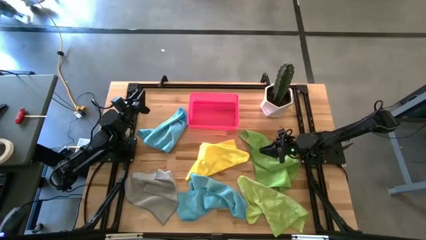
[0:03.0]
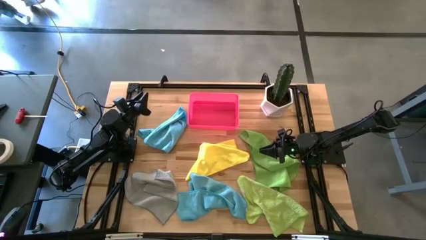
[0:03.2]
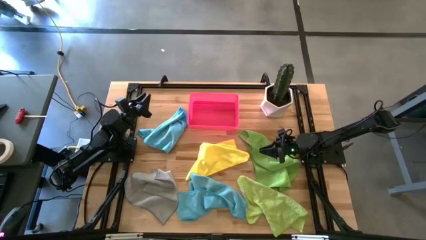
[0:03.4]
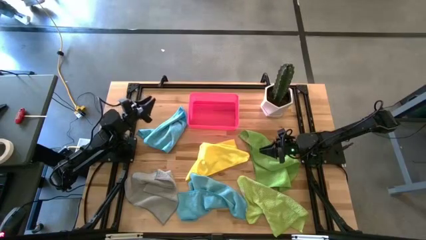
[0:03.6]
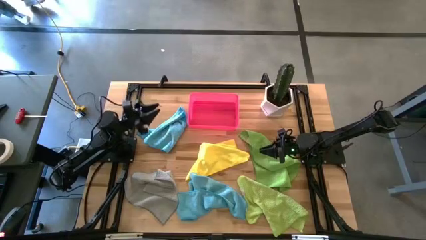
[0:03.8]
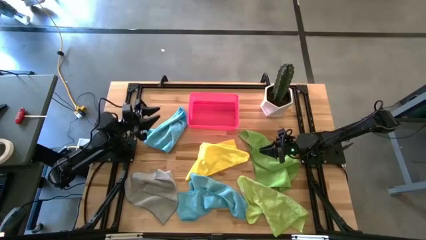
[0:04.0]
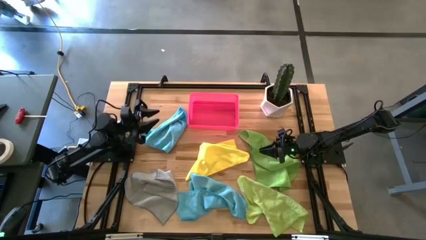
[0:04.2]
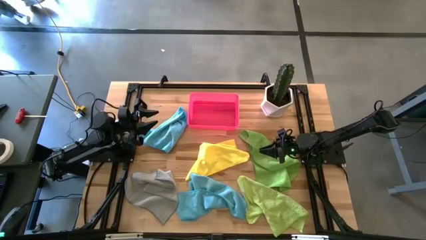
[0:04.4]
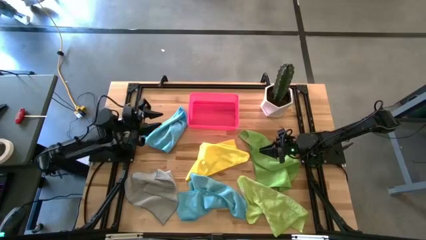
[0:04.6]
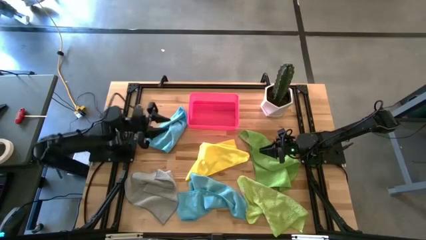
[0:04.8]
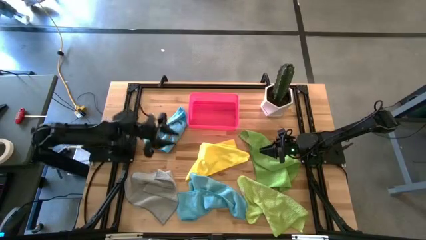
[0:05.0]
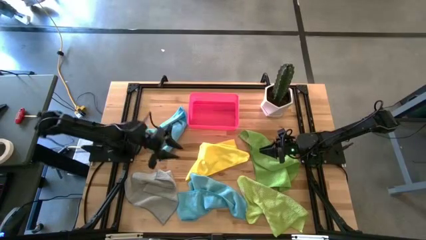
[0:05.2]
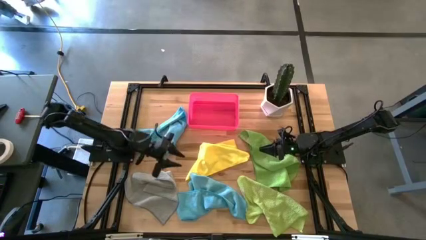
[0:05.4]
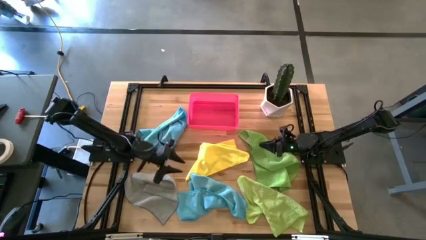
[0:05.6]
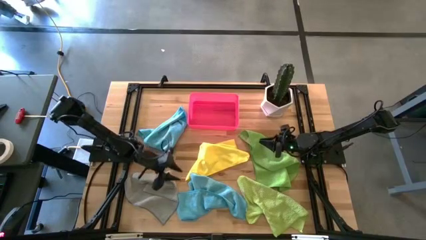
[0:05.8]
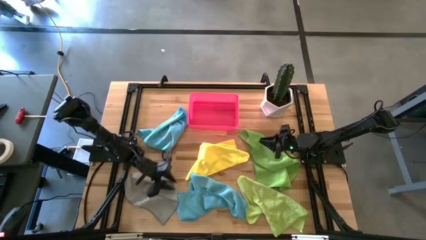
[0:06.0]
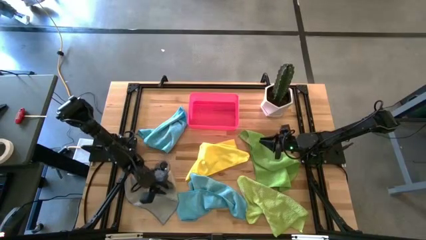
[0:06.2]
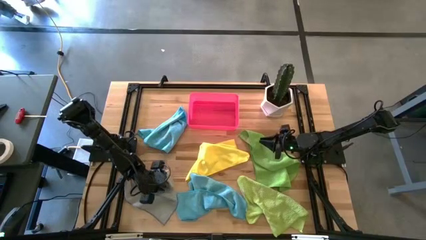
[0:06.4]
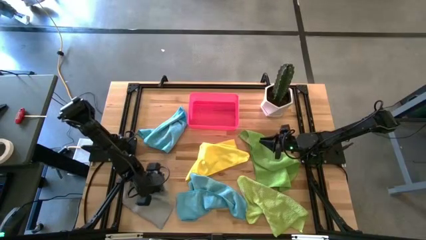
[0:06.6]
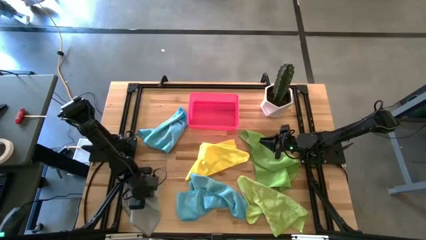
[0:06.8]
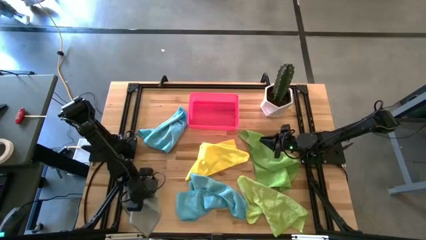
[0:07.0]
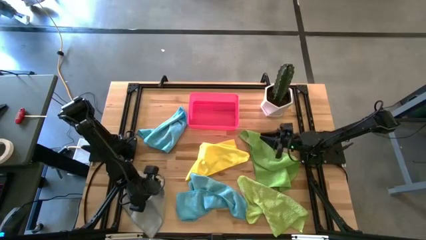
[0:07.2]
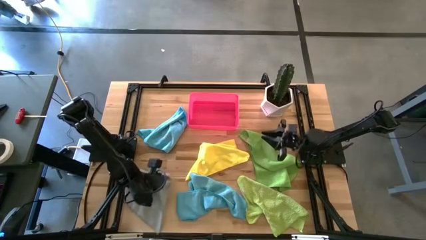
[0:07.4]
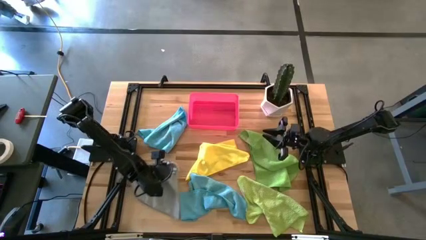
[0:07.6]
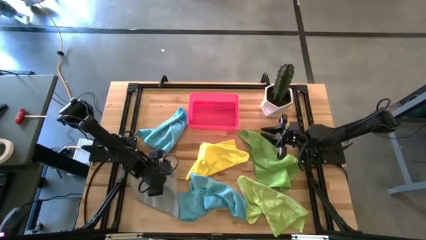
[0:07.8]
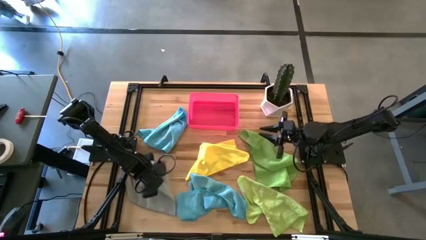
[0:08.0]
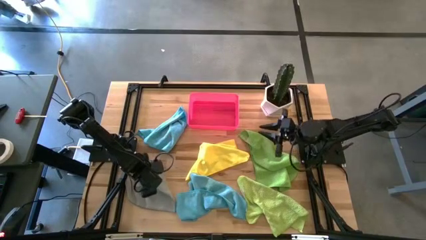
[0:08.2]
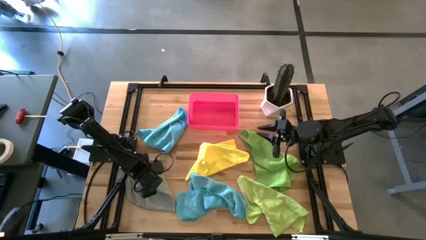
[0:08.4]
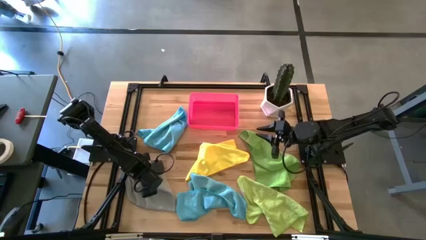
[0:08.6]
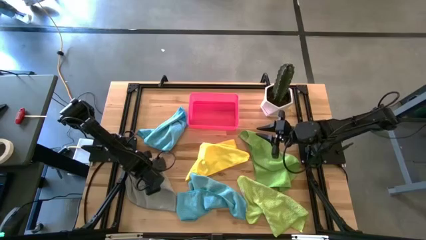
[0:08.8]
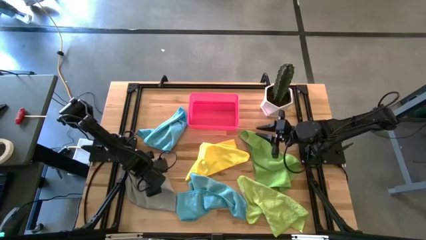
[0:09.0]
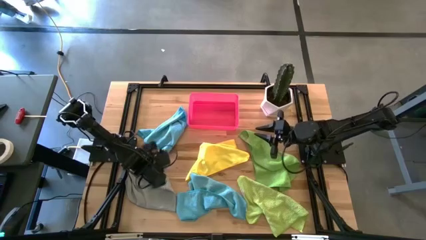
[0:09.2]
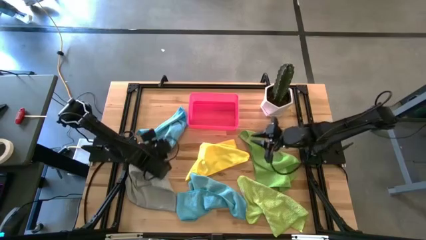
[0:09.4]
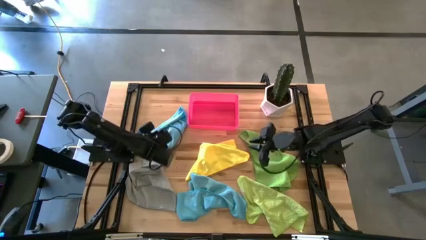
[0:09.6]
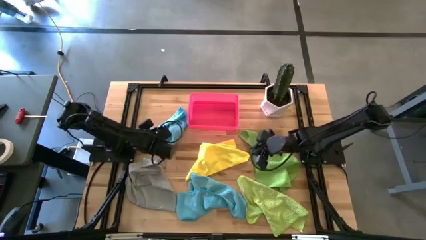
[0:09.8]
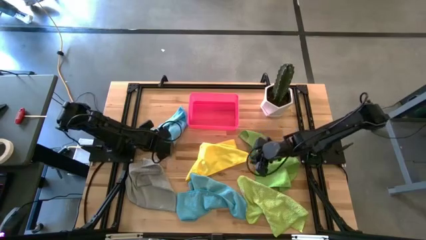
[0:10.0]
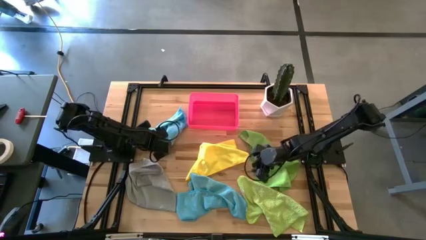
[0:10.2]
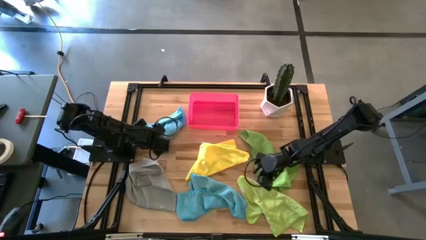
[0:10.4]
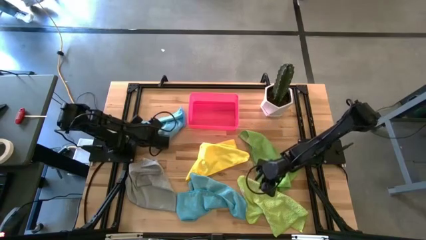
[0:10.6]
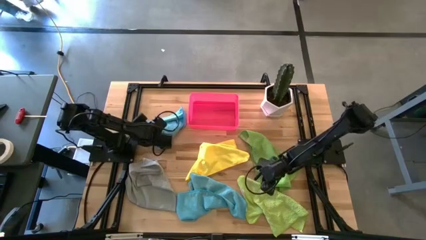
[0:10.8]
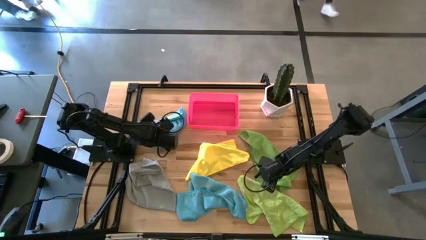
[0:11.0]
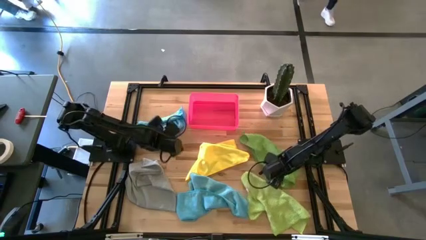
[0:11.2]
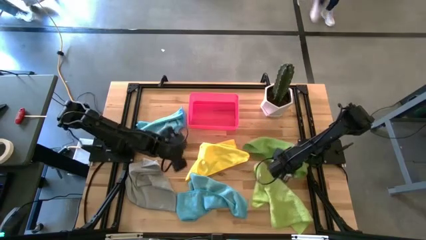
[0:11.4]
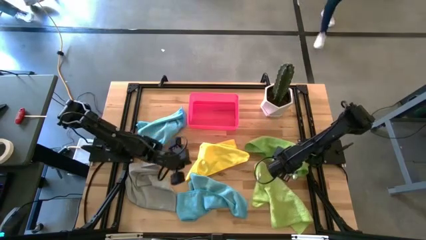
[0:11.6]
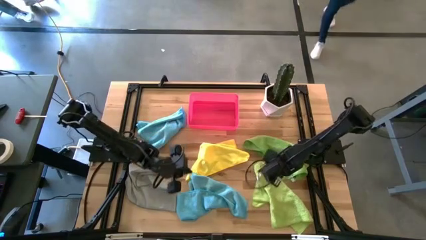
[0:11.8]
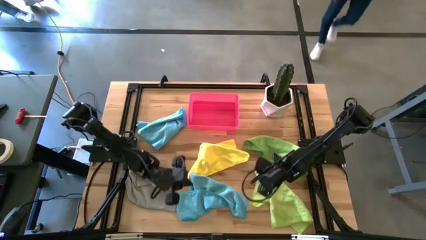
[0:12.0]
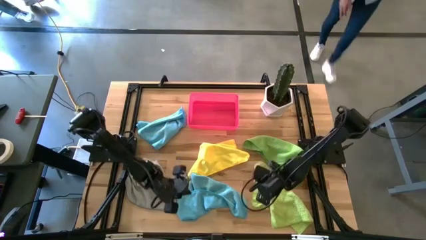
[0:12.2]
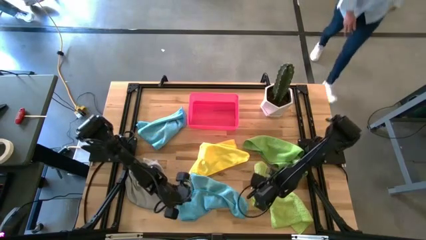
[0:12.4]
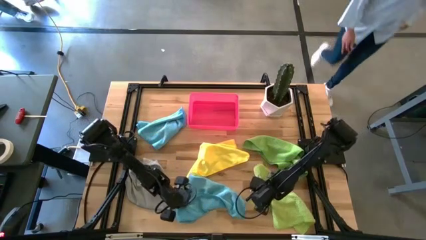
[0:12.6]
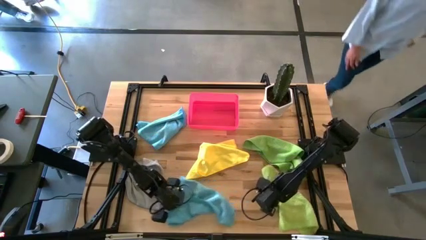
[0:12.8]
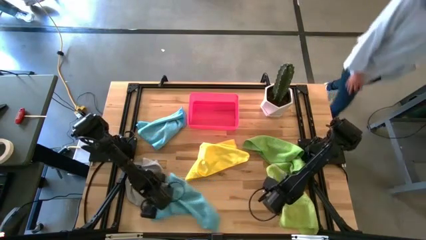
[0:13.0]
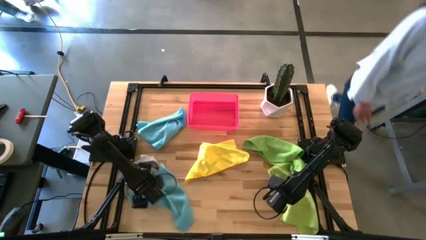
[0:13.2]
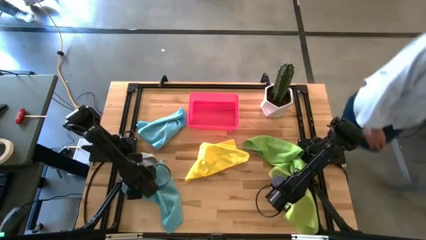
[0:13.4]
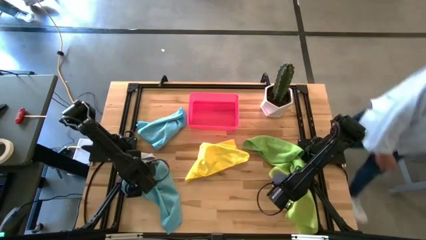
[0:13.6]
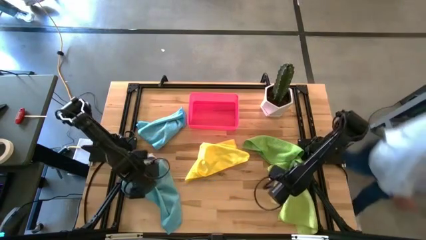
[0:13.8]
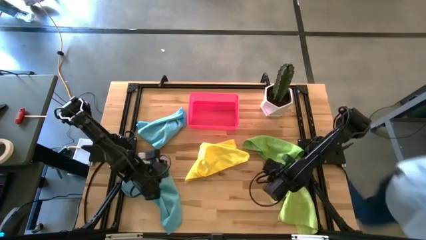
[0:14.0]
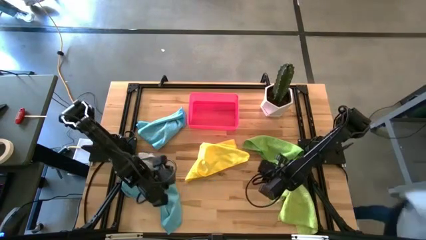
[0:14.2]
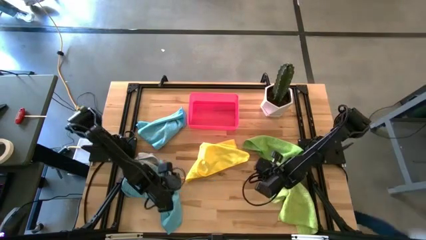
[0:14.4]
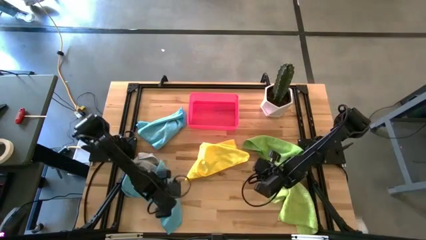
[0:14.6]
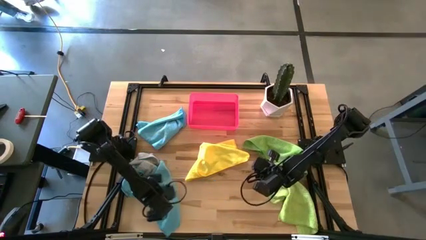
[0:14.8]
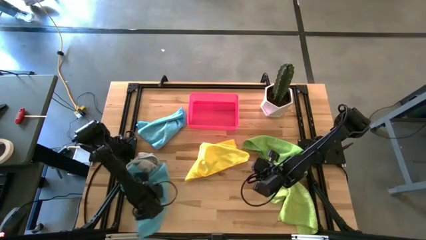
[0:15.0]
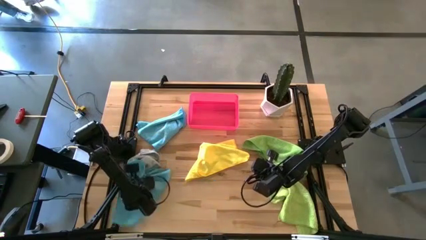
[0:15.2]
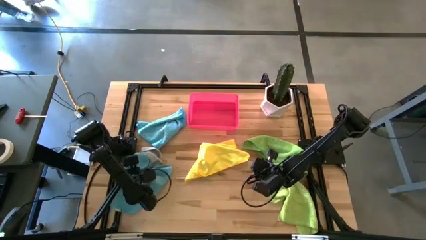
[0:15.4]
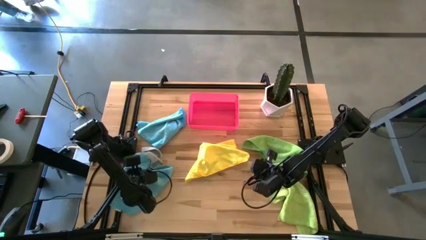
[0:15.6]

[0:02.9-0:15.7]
Task: Fold microfiber towels
Adjust the colored microfiber cloths
